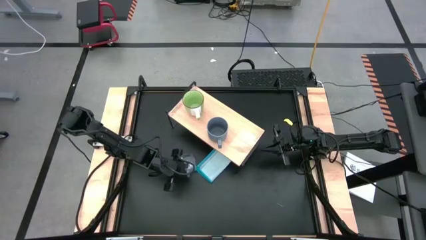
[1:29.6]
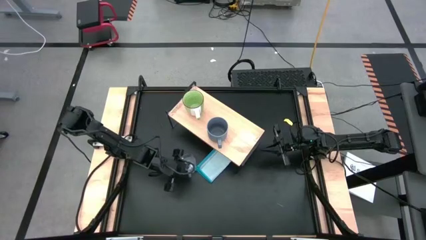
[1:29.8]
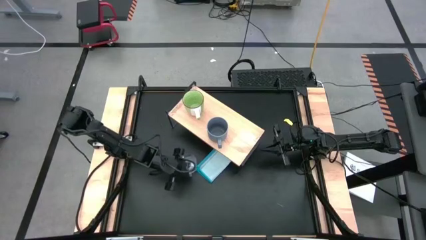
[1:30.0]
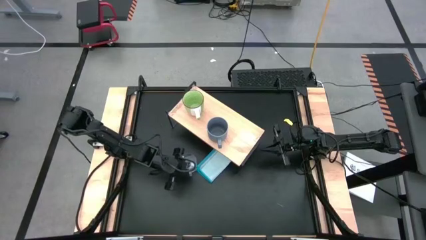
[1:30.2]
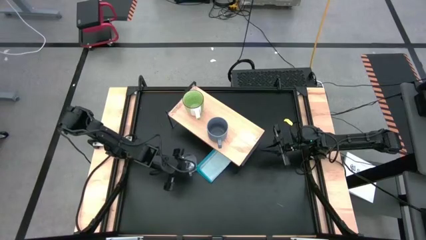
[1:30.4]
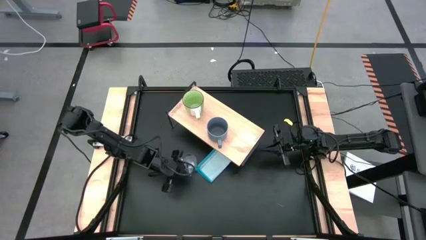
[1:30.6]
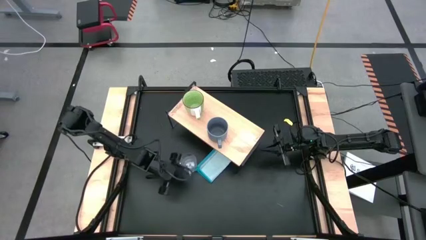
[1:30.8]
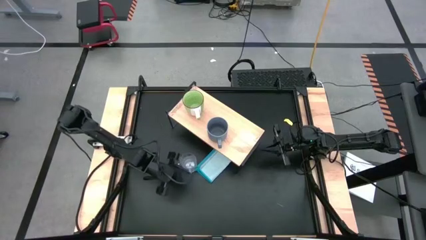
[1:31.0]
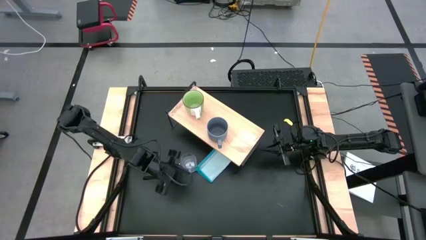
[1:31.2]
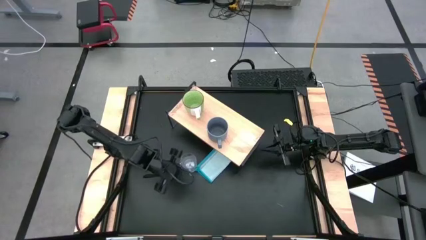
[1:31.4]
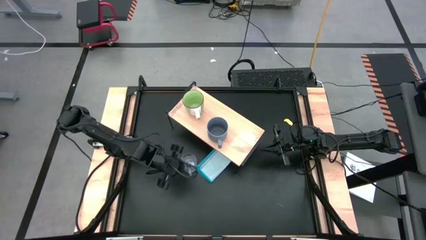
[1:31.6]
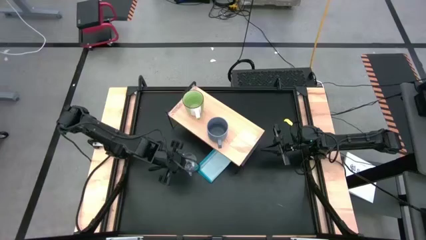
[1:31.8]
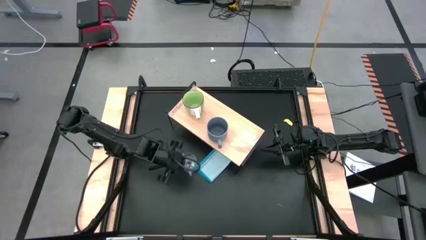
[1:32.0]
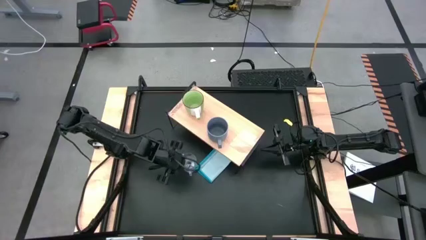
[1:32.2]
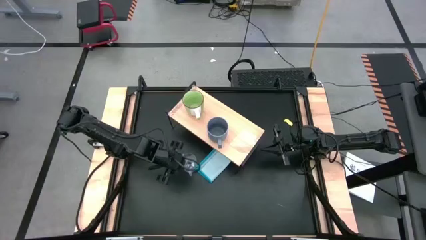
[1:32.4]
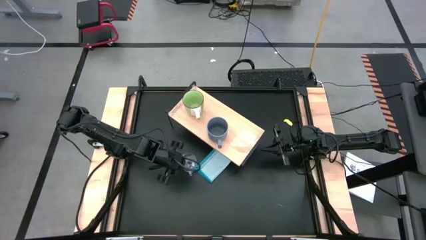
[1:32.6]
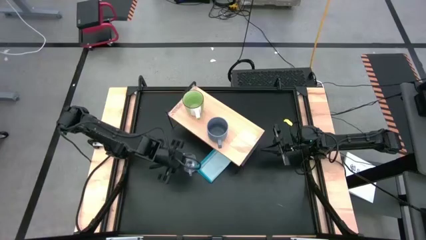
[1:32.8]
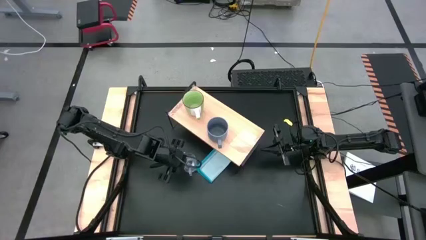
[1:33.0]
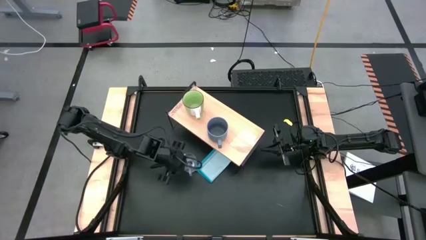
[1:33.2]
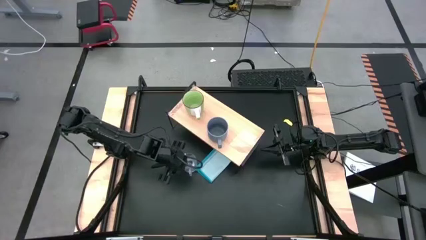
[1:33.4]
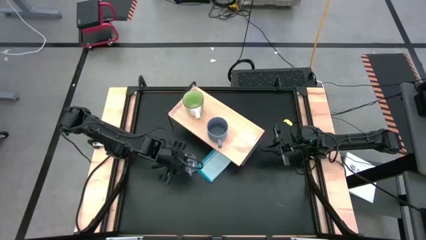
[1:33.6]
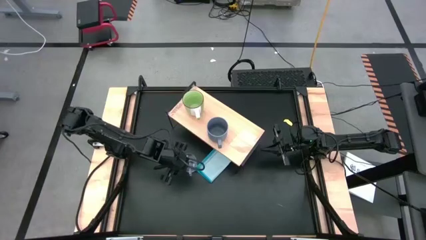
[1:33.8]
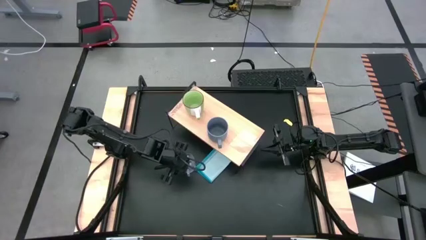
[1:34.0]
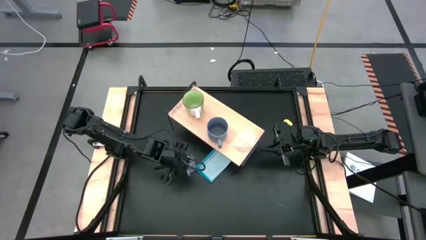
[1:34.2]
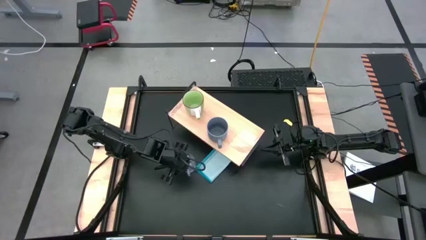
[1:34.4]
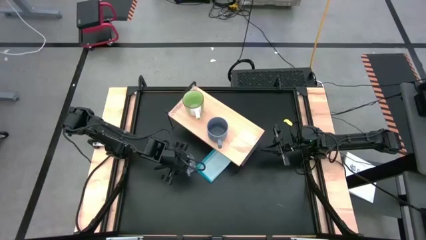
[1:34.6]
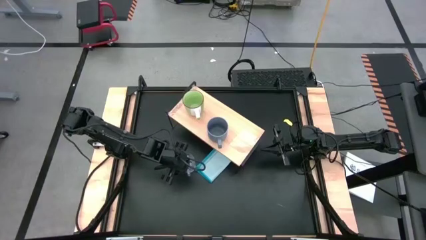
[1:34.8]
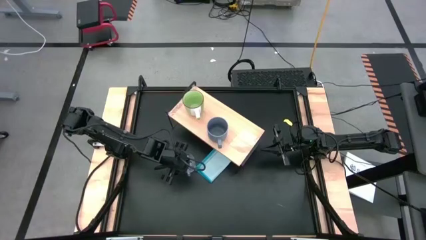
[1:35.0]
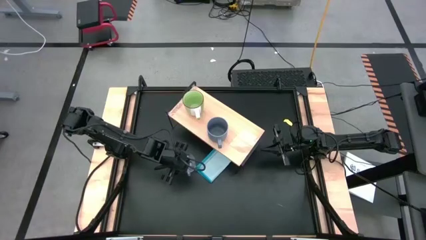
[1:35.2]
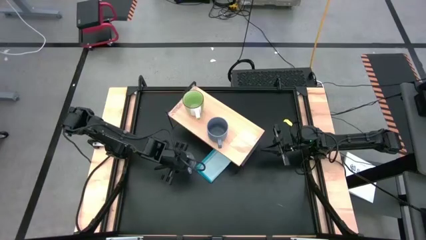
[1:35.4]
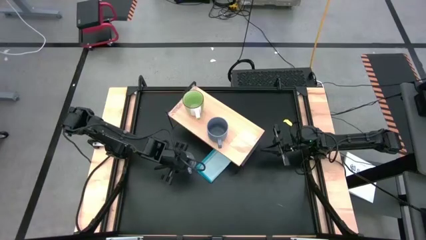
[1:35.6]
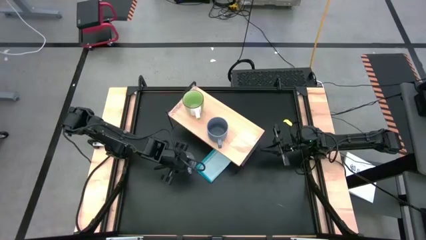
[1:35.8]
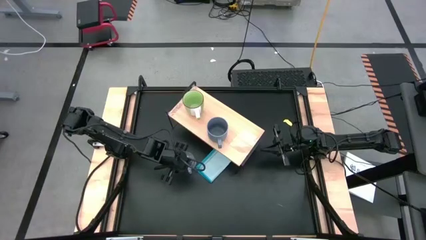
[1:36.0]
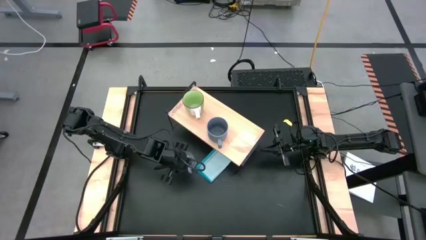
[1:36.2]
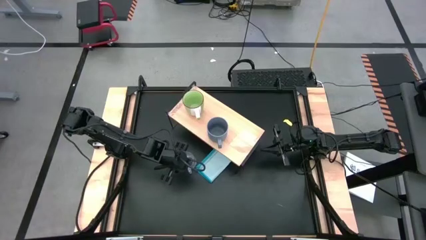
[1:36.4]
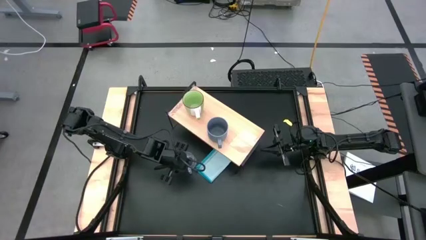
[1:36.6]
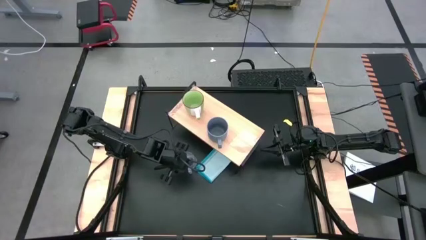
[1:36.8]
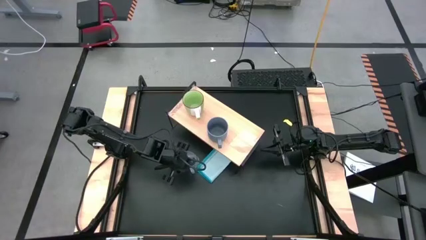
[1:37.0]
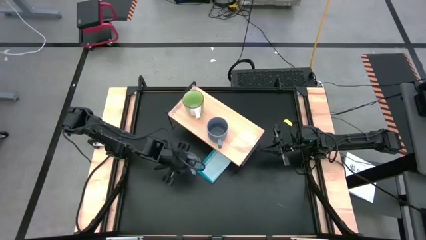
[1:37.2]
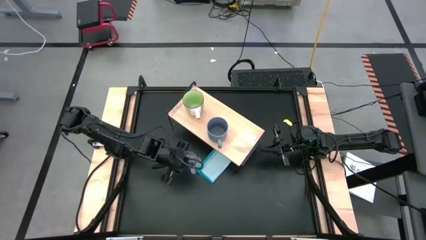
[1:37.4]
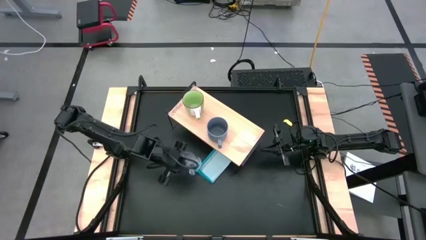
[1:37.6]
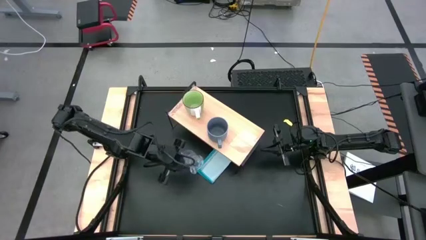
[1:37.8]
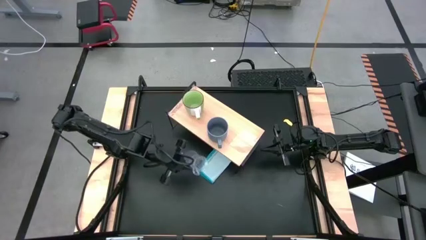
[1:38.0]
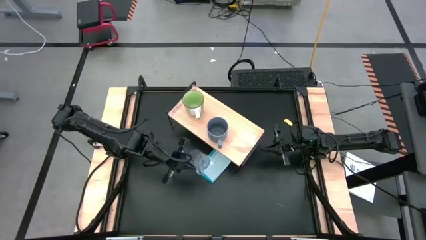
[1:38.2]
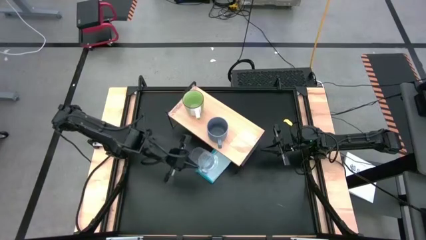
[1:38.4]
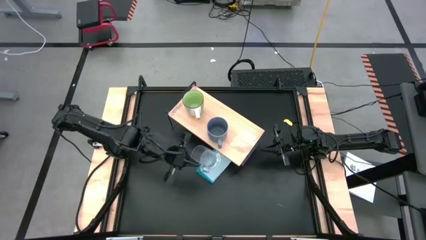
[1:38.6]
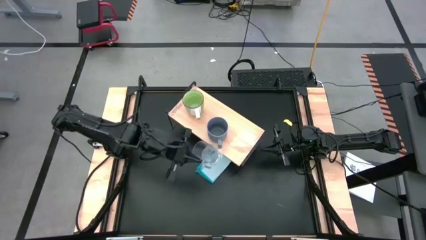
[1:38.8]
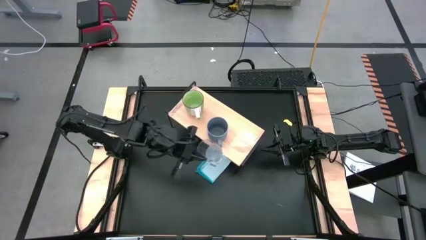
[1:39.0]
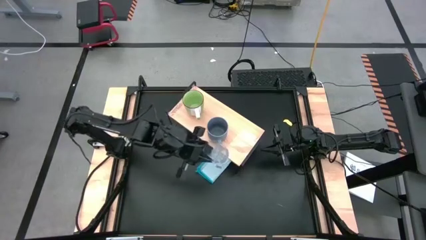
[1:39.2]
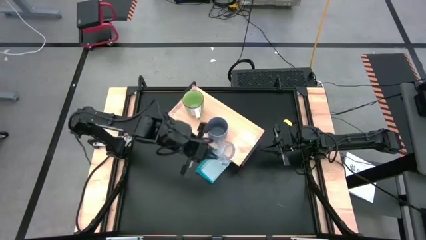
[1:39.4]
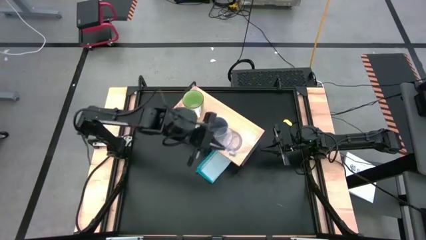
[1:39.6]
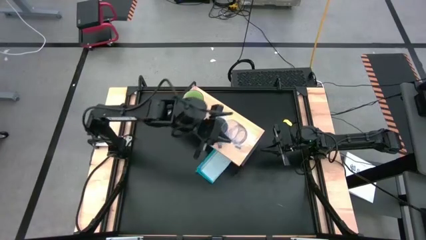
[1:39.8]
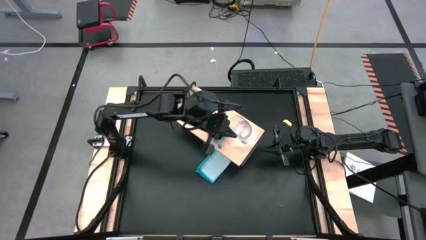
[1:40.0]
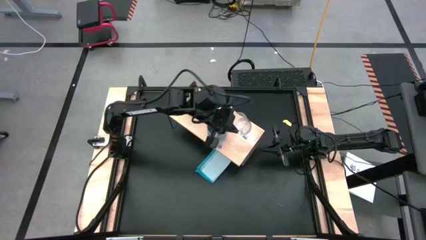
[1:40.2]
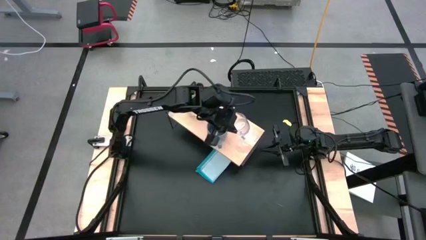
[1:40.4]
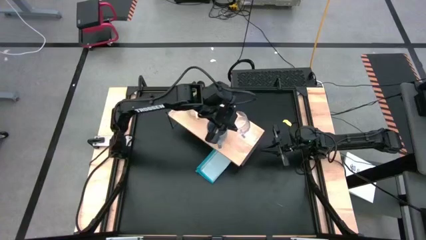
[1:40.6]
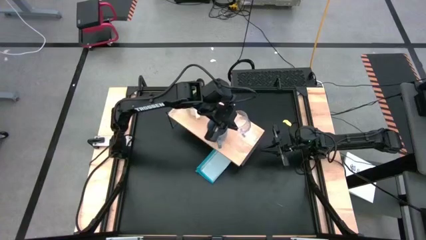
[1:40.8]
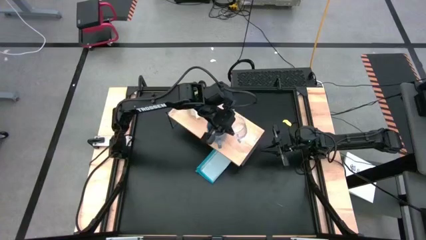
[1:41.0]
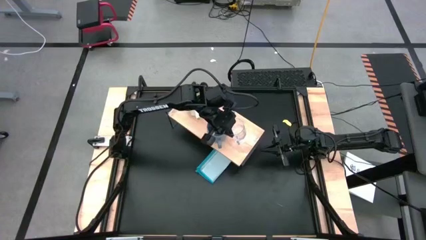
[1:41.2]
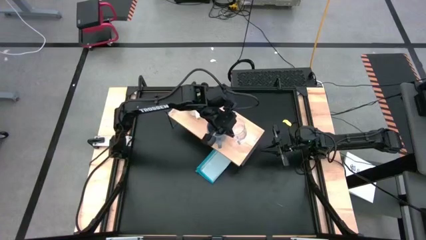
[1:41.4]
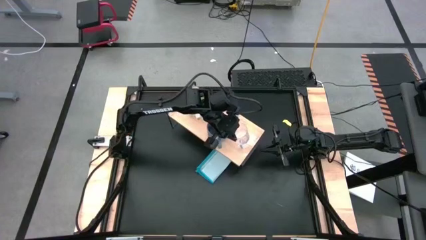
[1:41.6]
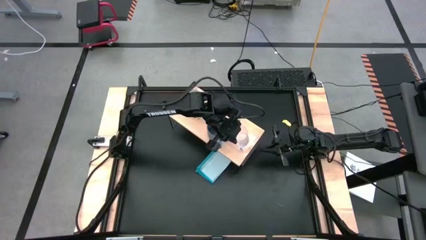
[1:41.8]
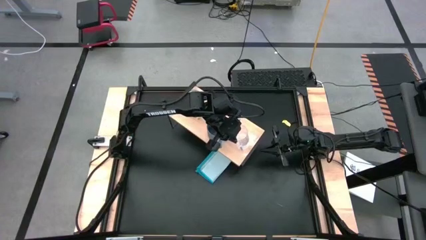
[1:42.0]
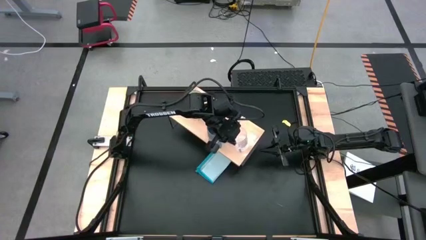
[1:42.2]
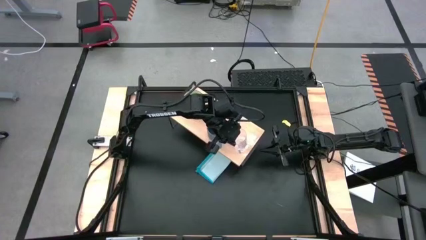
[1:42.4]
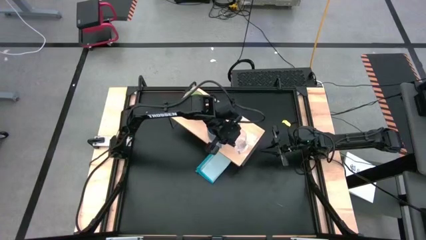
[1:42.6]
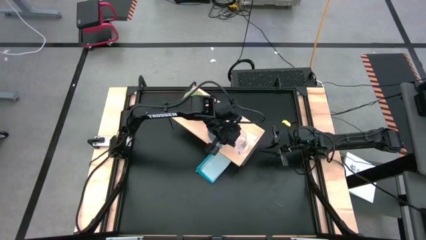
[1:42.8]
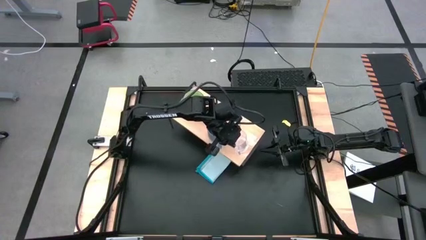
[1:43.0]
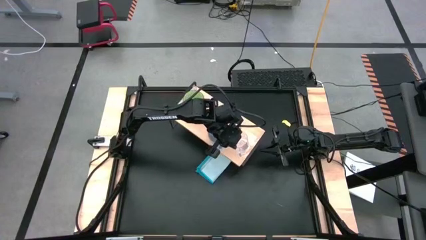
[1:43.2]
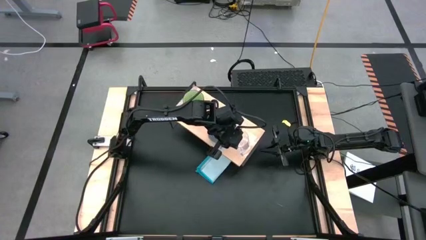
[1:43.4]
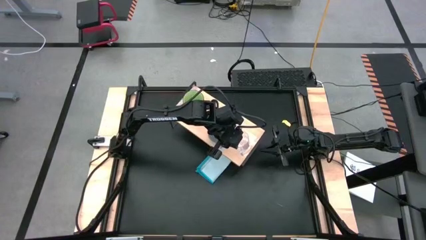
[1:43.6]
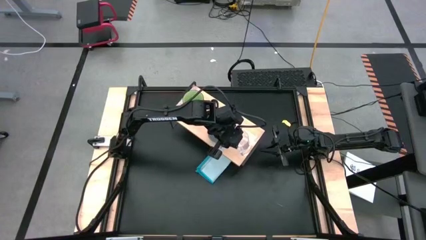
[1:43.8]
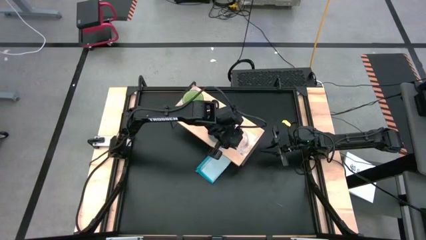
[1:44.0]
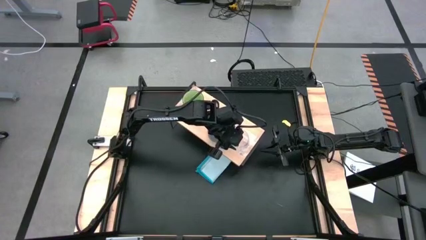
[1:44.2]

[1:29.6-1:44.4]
Task: Stack small to large cups/mugs on shelf
Put the transparent mug on the shelf

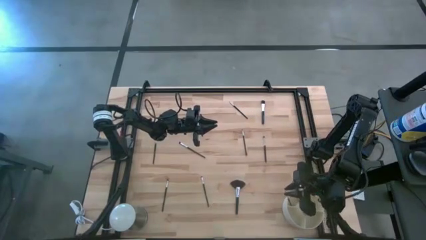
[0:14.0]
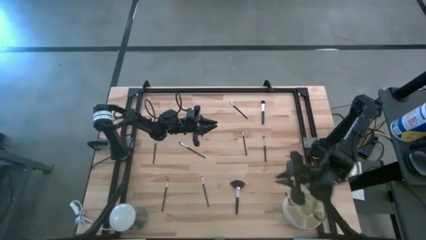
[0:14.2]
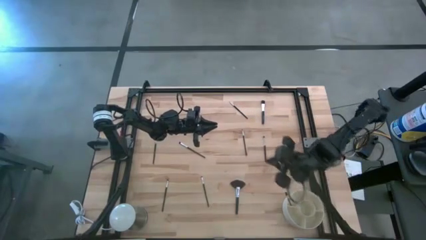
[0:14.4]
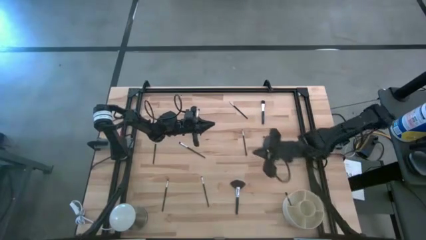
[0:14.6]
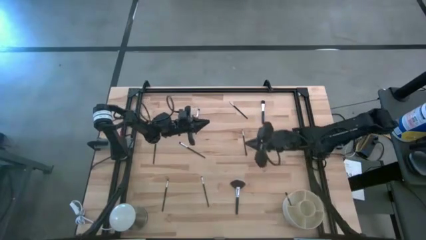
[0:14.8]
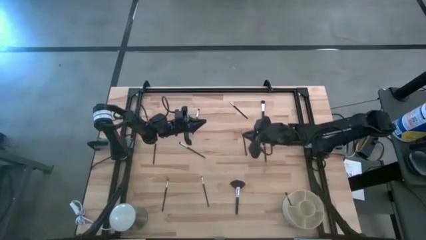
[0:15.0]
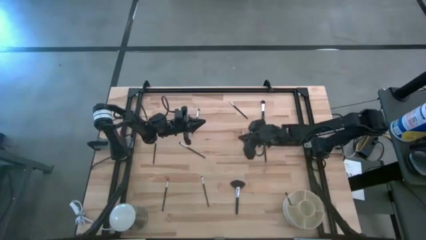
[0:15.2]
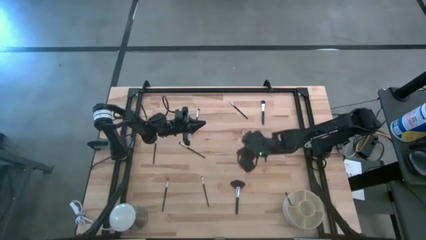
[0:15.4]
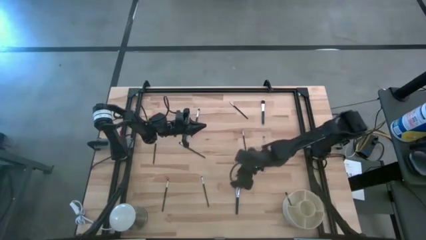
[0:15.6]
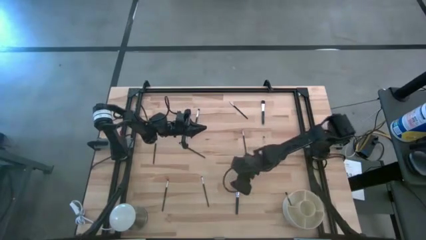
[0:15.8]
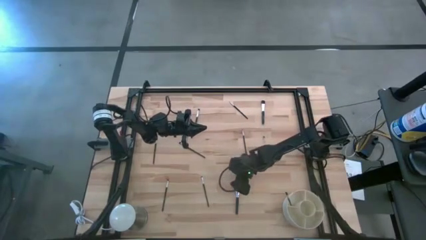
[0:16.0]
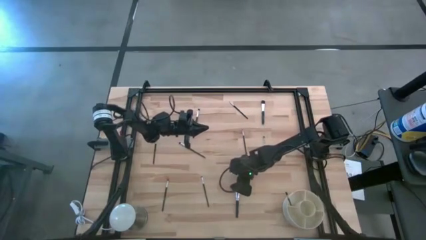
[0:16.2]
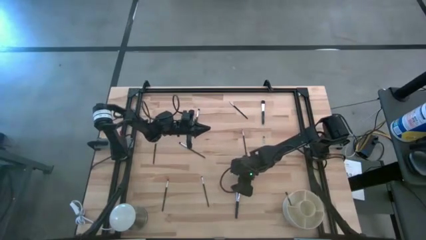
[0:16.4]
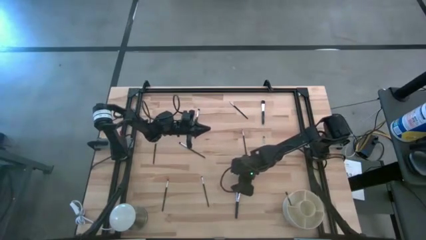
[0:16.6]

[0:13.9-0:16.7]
Task: Put items in baskets/containers
Put the black highlighter brush into the white organizer
